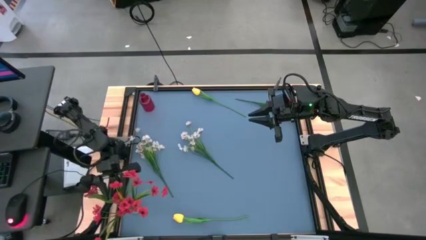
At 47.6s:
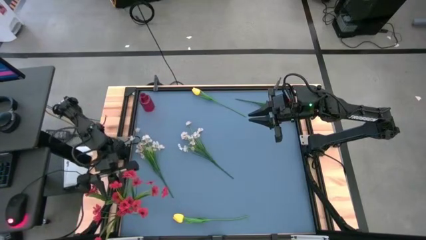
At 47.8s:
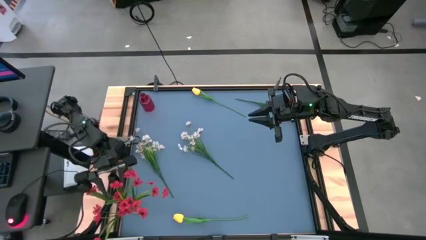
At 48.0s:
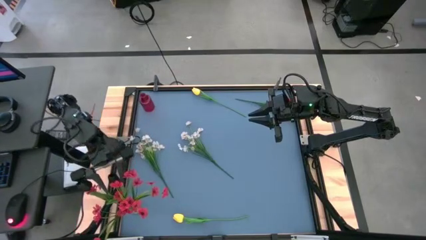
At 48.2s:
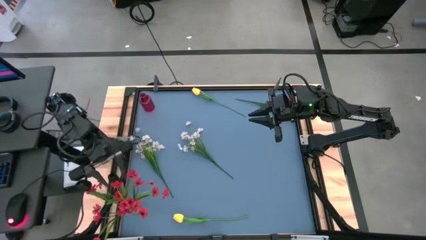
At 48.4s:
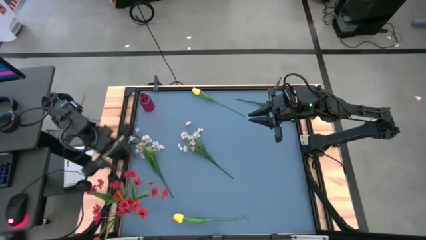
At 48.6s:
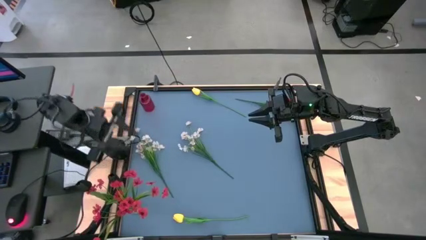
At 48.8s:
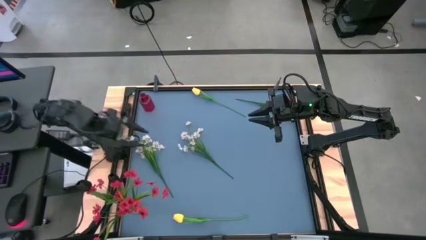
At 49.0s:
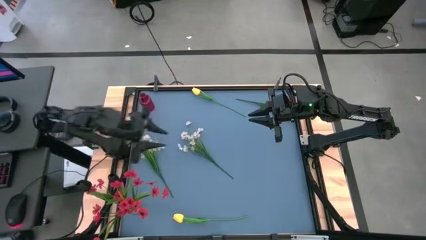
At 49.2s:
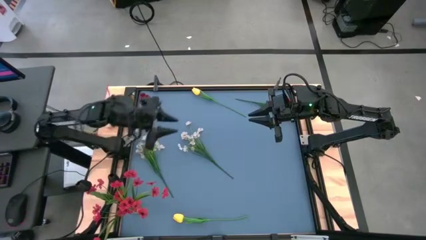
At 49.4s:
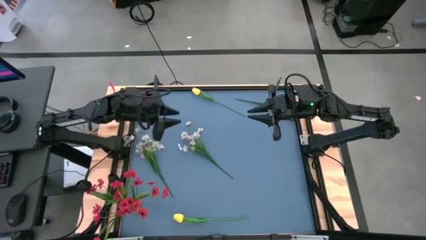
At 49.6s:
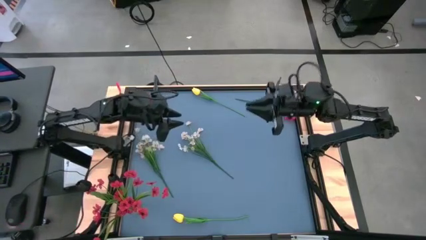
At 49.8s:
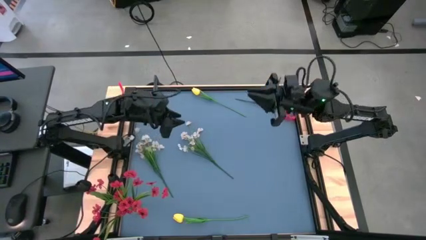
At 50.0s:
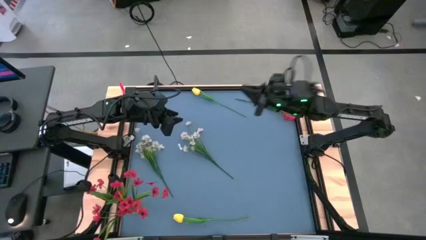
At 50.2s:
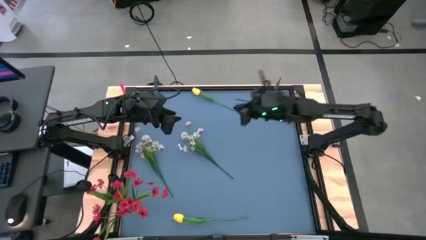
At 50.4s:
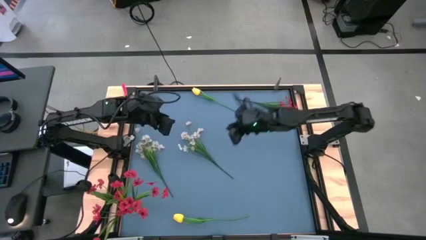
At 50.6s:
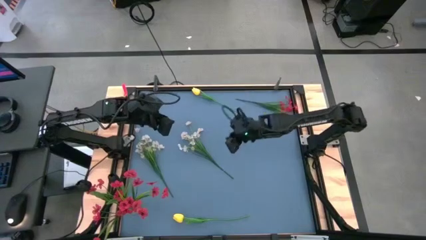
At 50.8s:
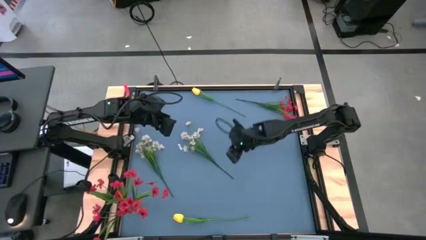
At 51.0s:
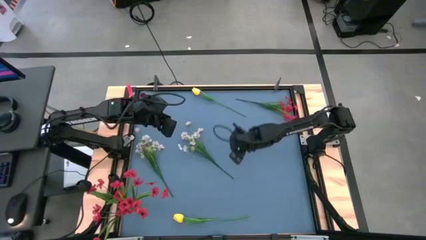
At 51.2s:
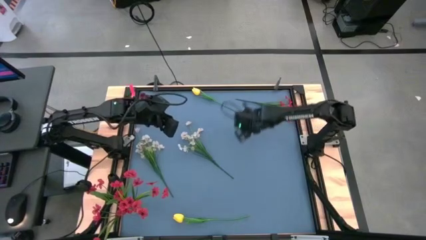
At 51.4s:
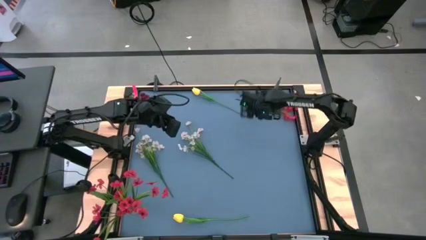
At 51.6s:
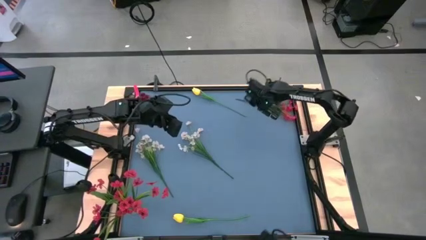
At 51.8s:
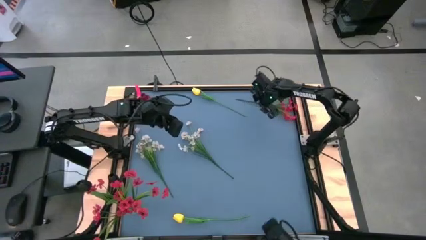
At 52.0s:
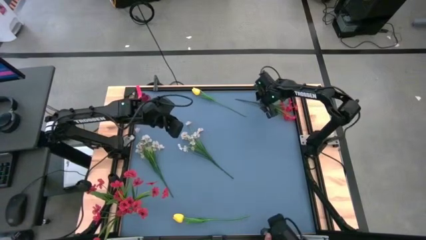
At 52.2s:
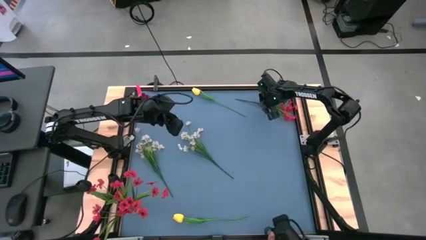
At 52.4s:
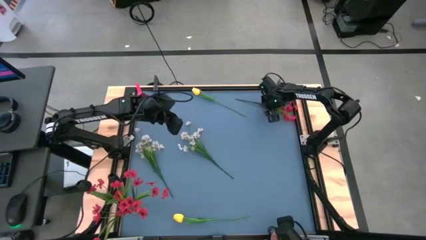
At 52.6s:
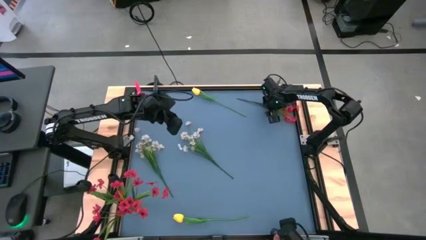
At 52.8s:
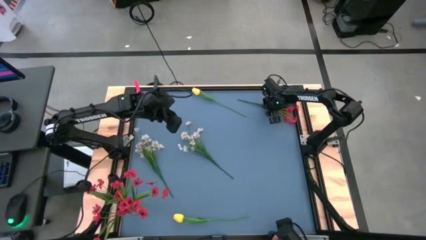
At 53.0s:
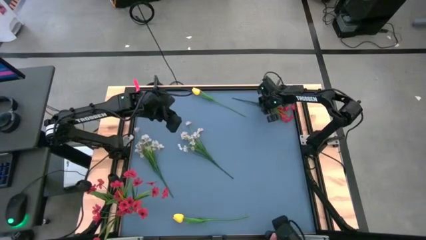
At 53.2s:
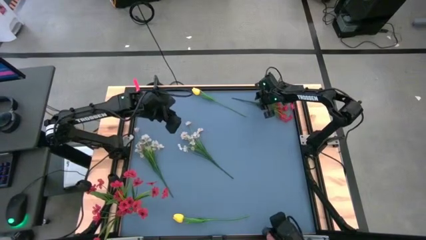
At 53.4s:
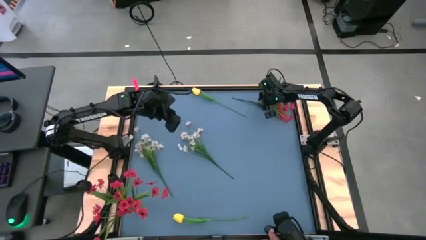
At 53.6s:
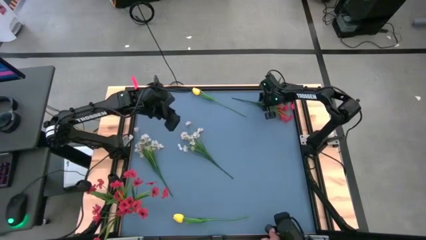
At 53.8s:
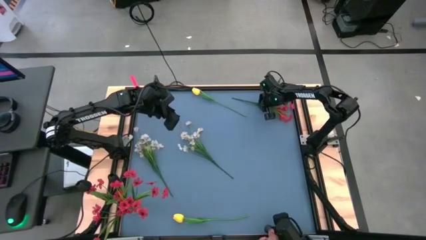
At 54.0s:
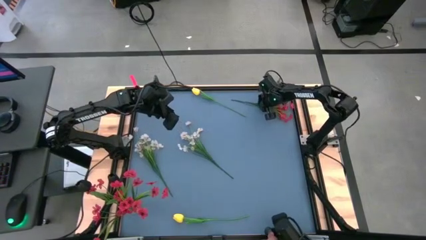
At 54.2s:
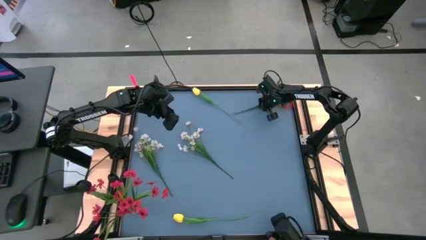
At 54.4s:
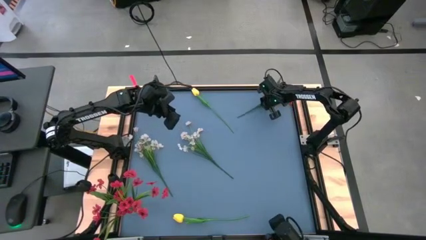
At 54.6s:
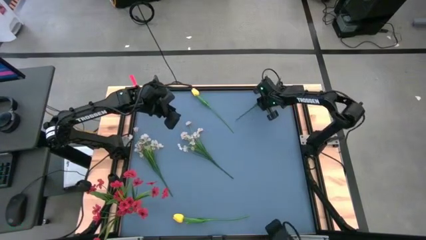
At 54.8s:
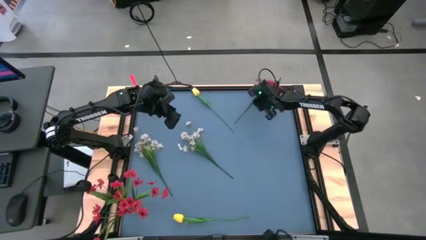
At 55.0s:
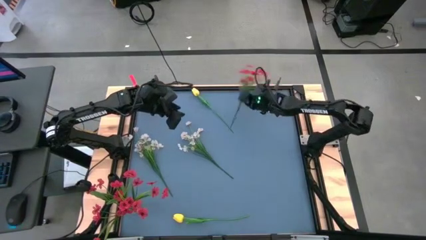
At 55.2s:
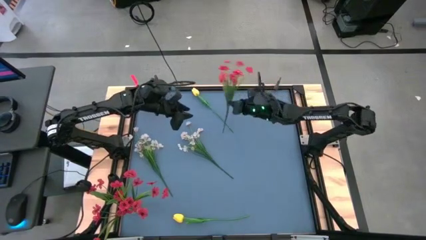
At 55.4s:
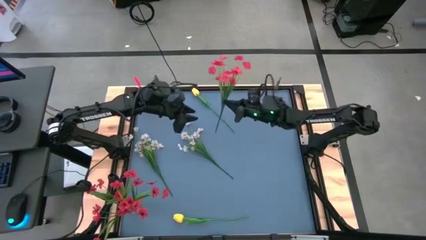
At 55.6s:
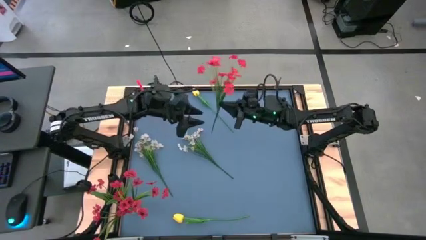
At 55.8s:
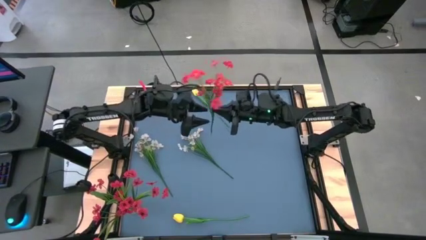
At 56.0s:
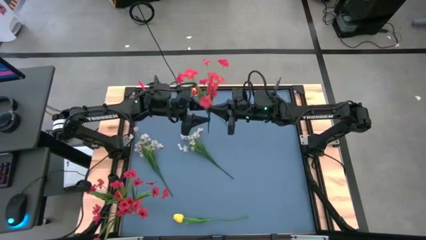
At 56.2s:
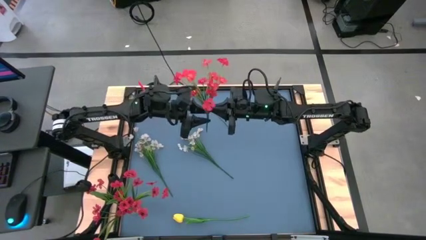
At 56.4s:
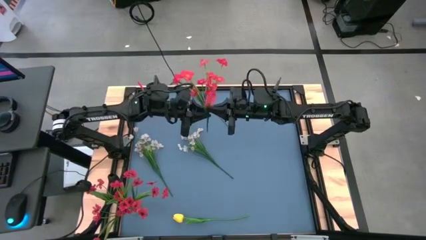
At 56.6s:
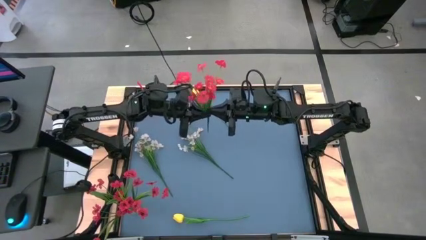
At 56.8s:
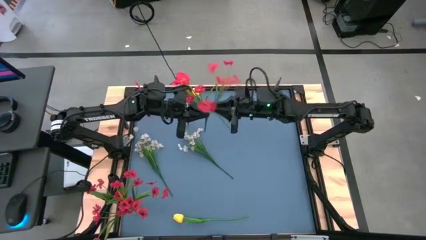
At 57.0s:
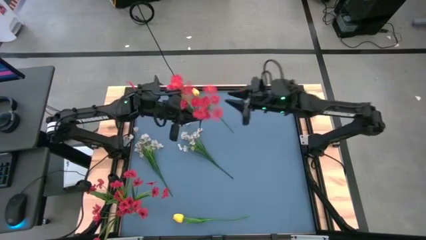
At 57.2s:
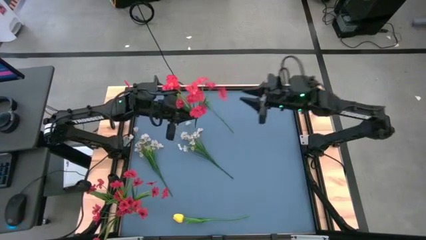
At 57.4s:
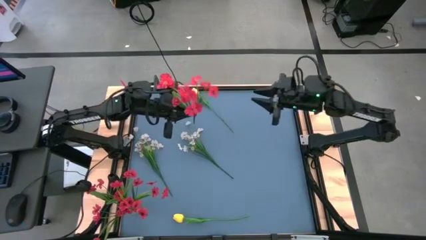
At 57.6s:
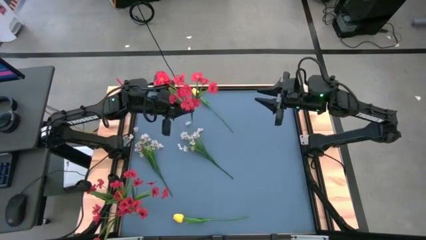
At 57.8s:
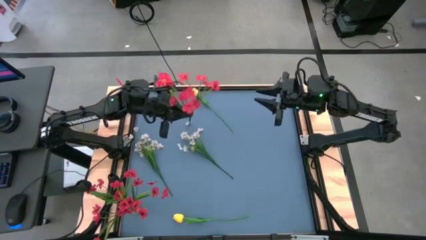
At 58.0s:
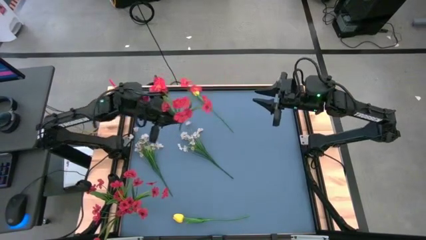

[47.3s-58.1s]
Task: Sort flowers into vase by color
Put the red flowers into the transparent vase
